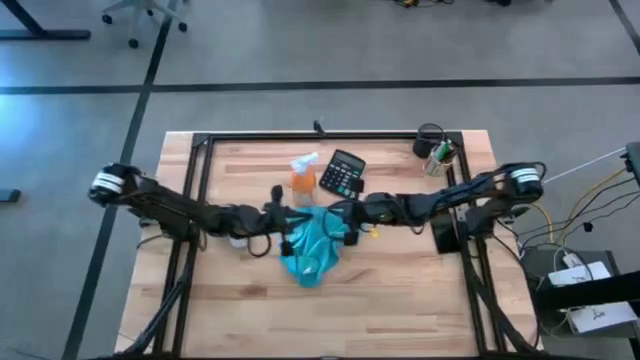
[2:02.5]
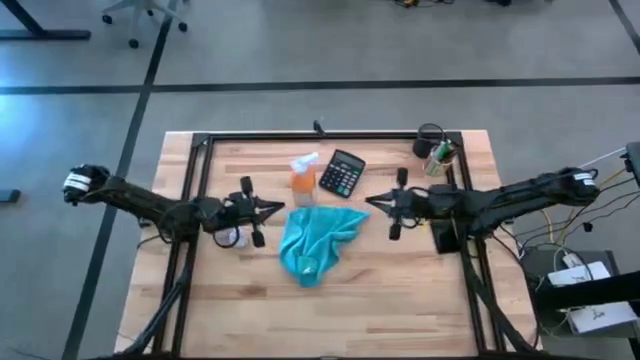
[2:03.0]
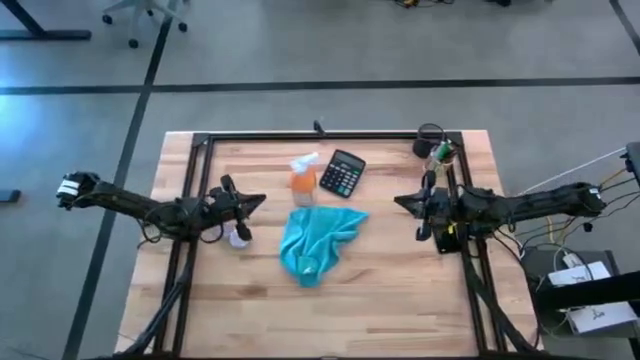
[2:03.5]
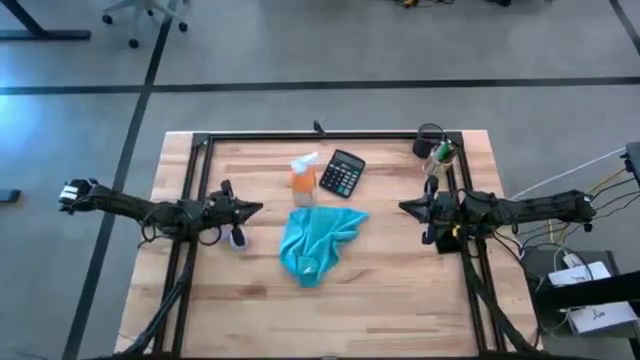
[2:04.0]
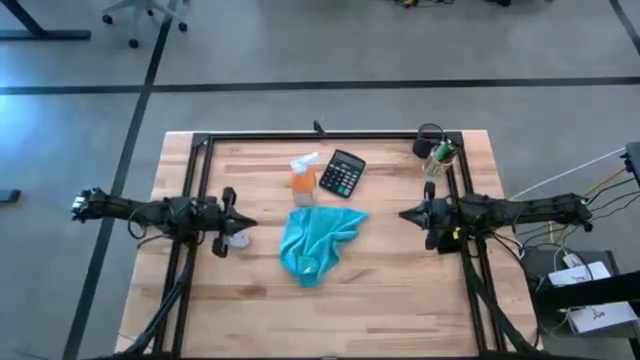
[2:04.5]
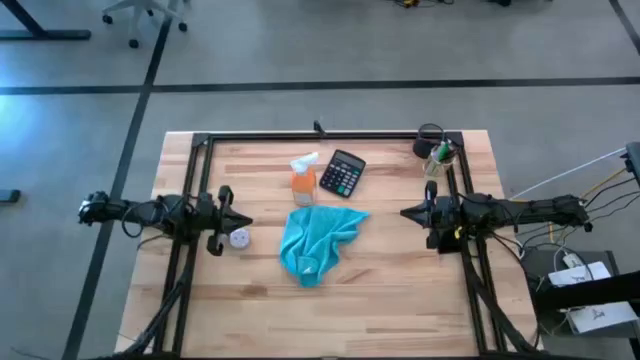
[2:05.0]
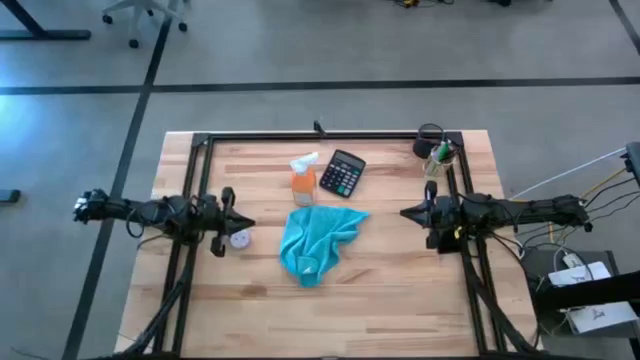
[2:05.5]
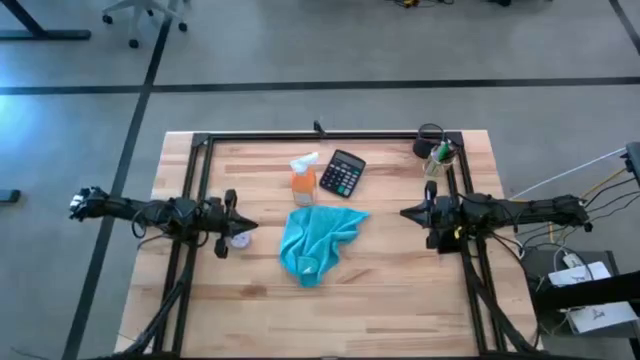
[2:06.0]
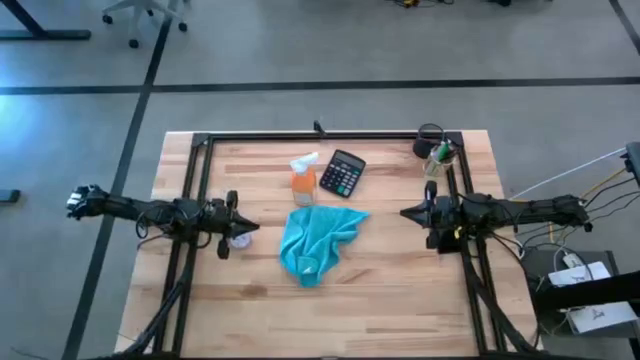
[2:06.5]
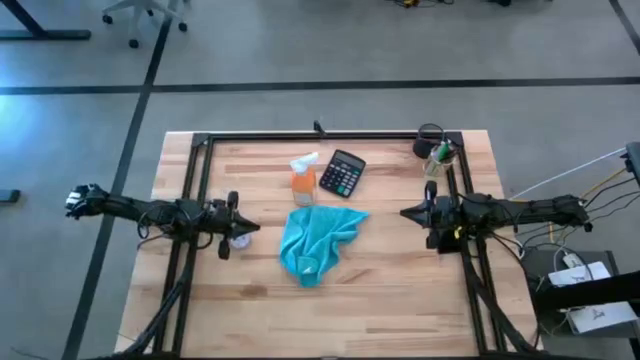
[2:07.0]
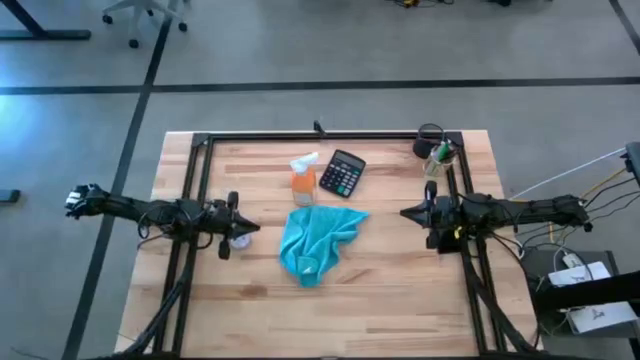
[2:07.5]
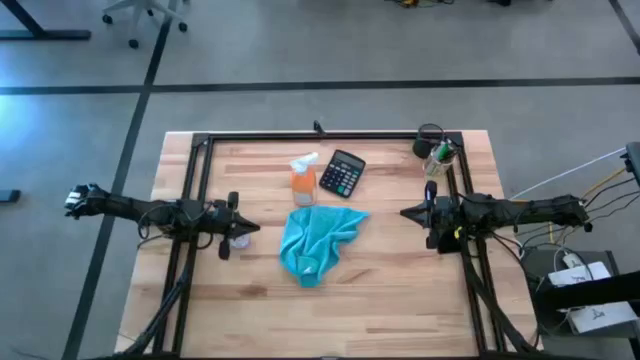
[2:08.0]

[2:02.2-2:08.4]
Task: Apply microfiber cloth
Return to Home Position

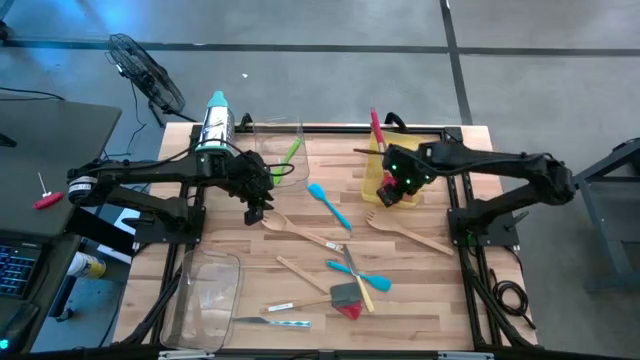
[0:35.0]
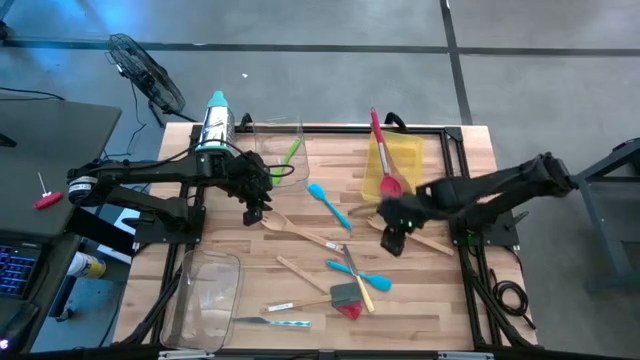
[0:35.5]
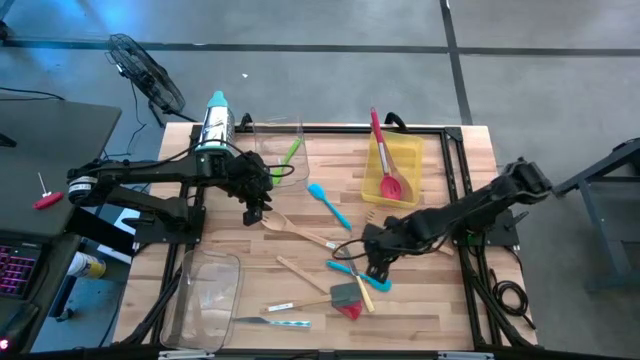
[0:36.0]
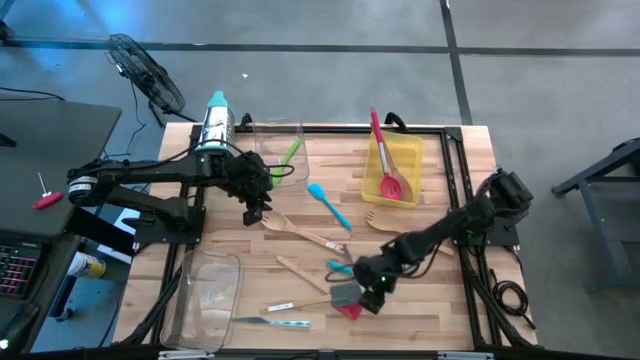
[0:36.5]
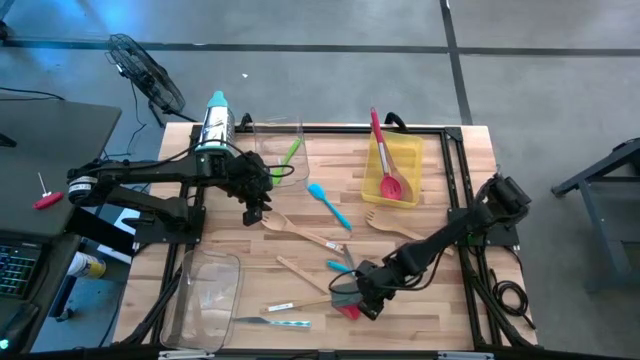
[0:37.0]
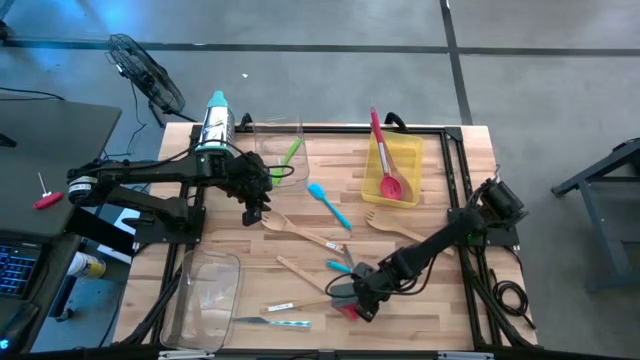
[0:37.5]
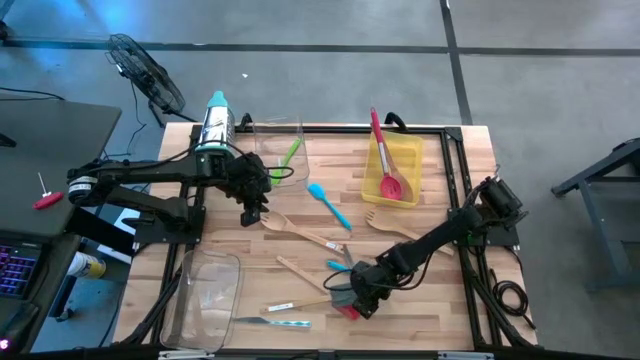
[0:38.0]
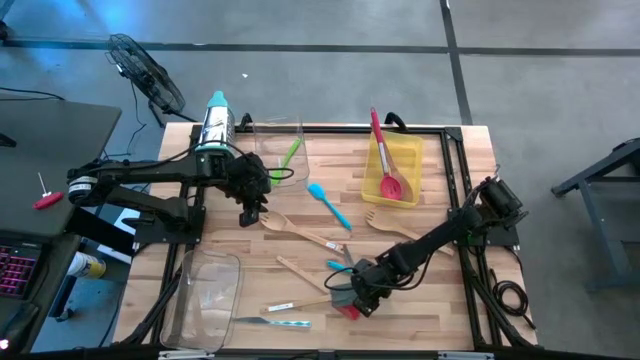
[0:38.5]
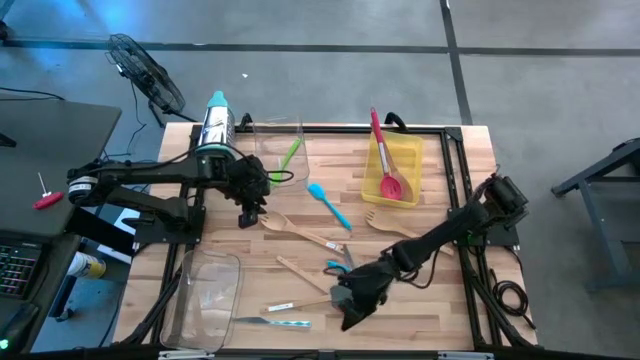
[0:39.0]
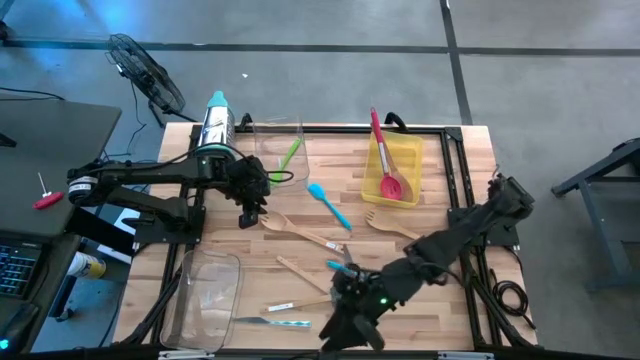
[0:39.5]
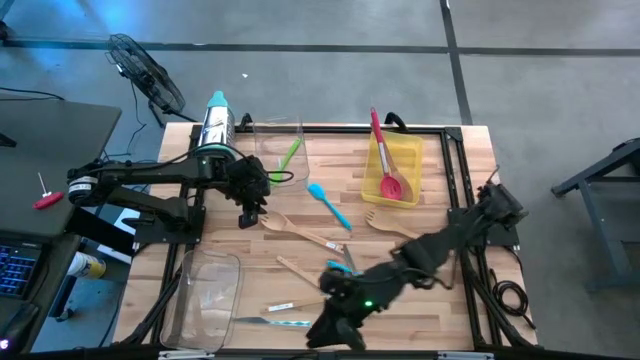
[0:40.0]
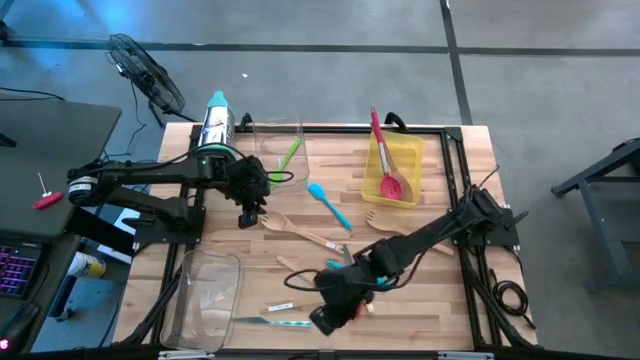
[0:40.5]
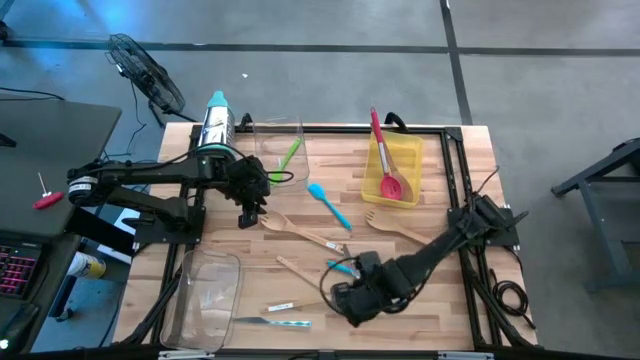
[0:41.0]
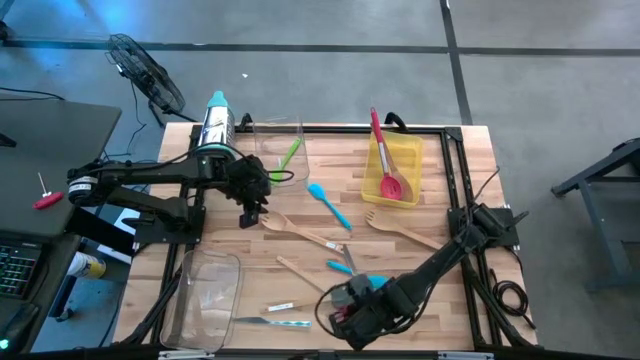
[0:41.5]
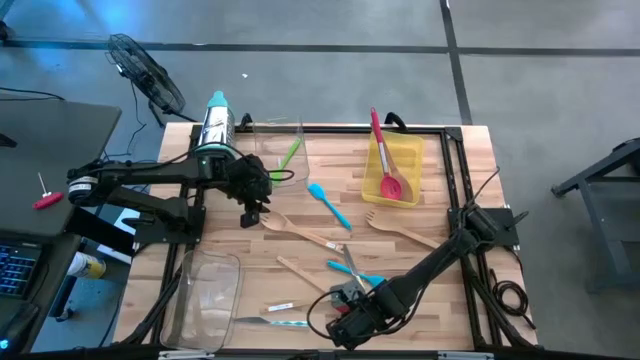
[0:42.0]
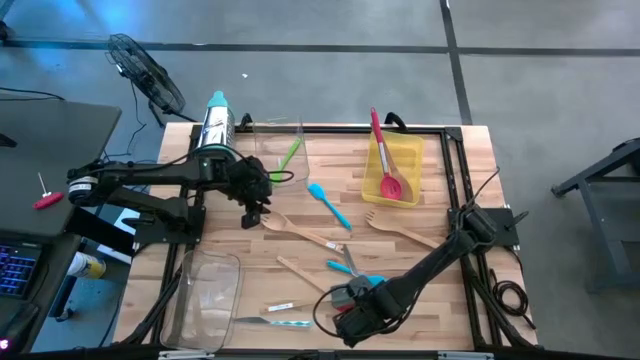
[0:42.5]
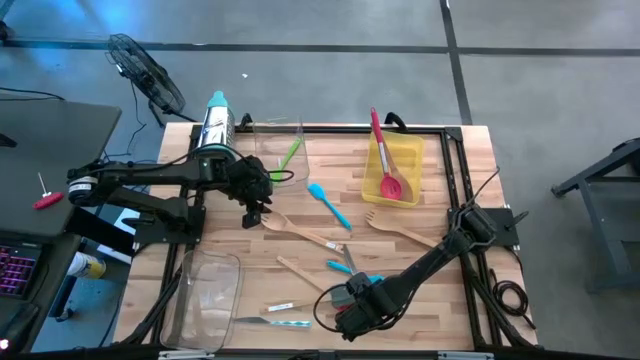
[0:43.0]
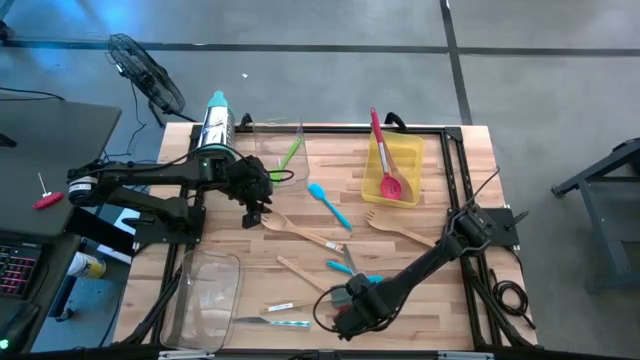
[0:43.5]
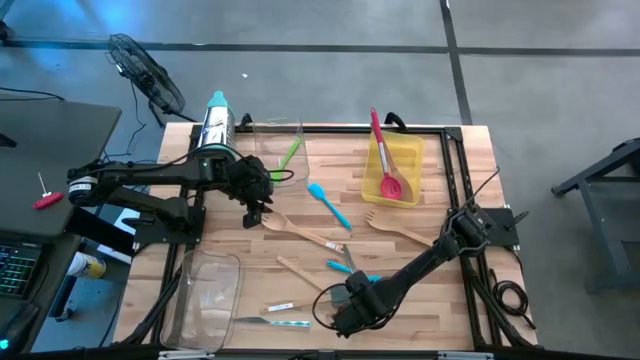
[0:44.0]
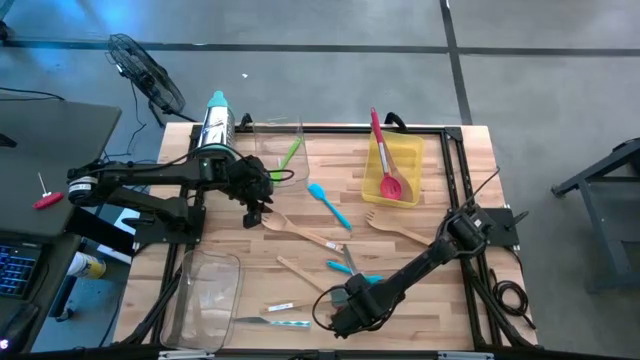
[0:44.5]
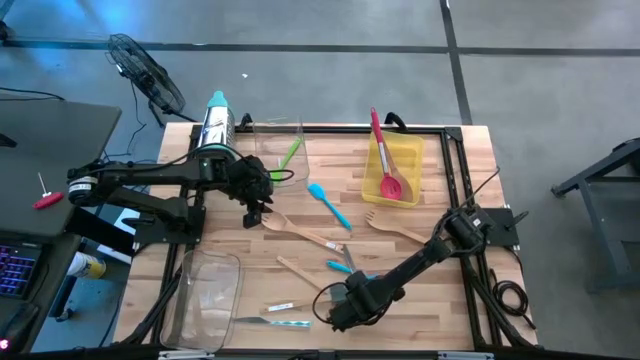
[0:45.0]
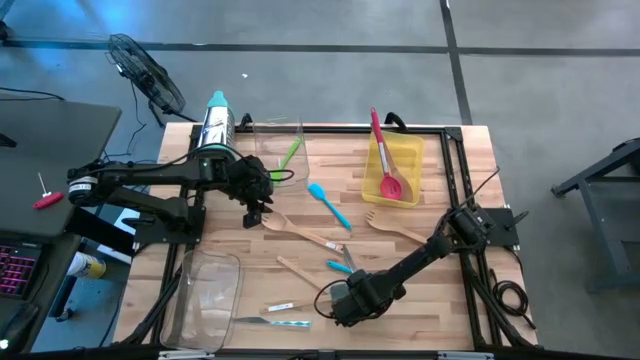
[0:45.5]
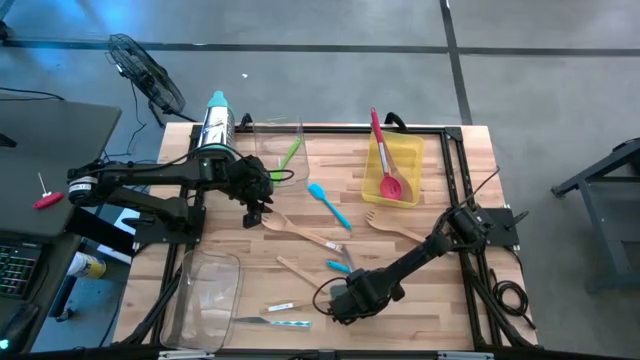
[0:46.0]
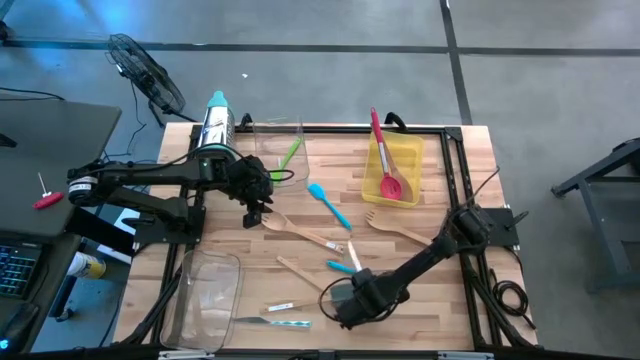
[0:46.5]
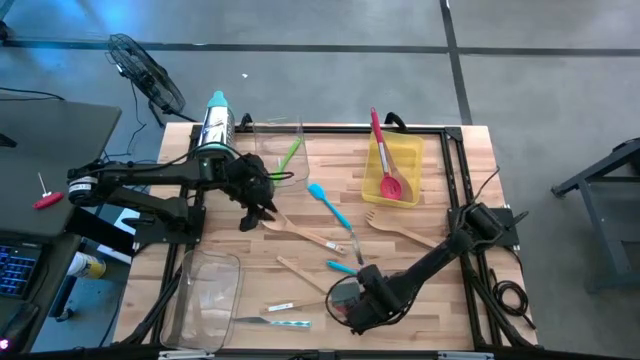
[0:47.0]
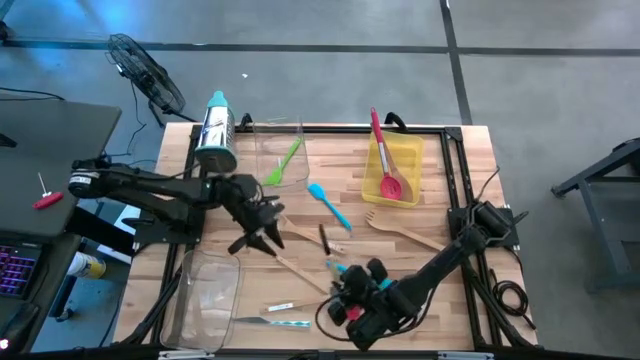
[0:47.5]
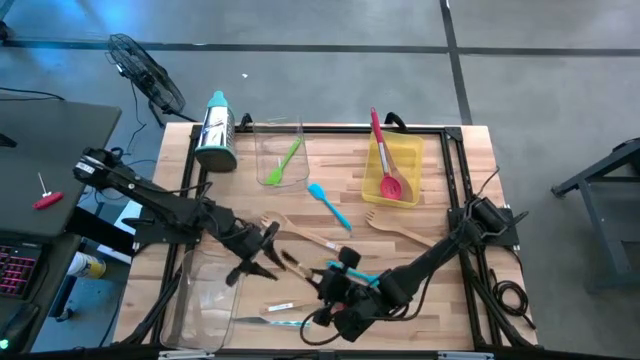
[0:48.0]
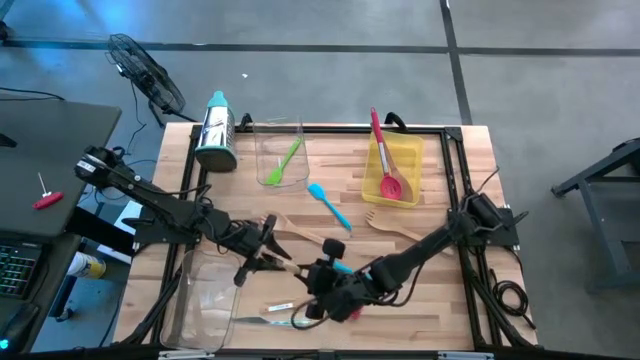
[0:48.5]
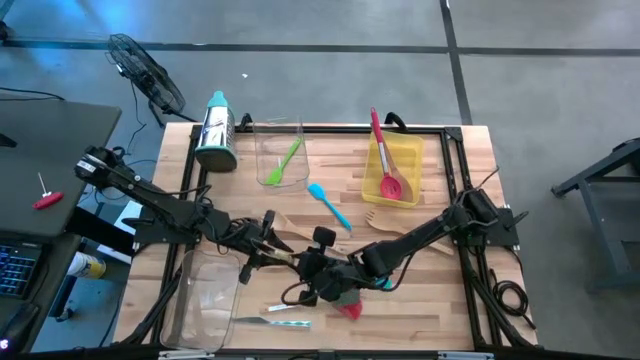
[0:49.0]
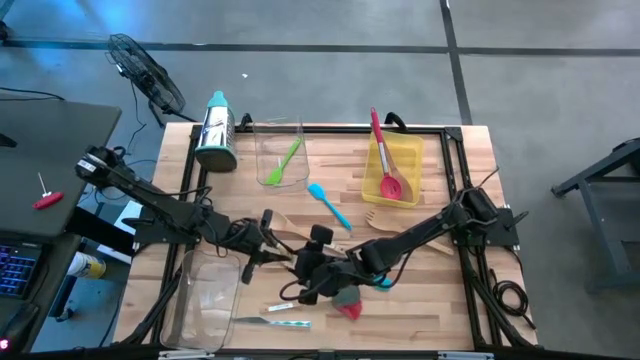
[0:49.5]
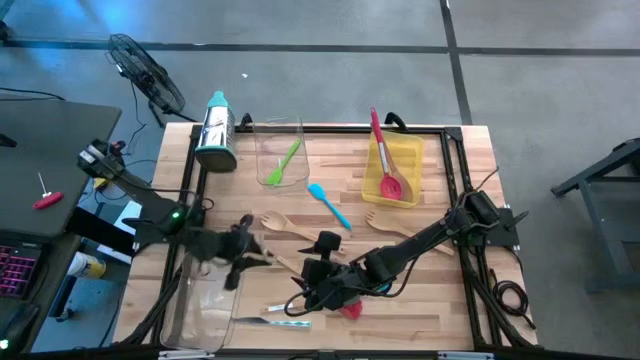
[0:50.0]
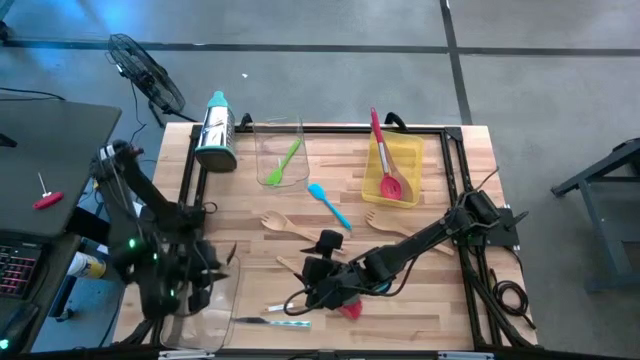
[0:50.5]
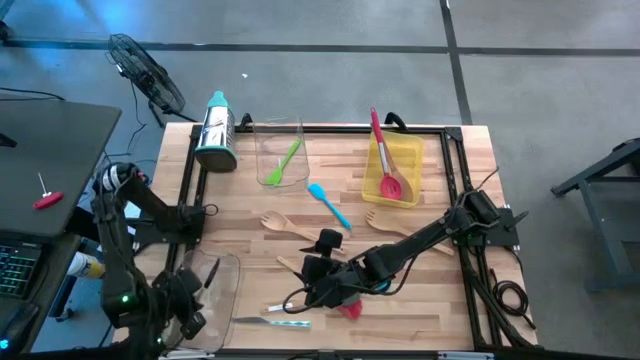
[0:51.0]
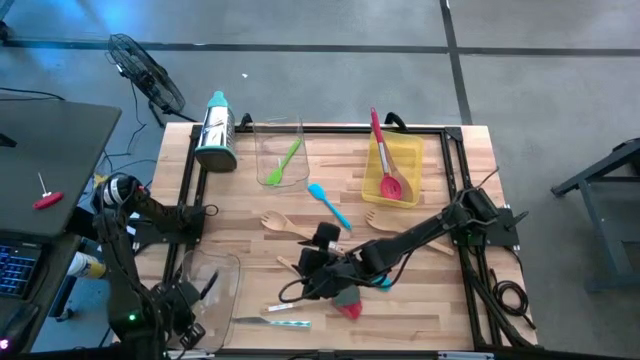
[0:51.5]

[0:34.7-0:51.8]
Task: Pick & Place Kitchen Items
Put the yellow table knife into the bottom transparent bin
